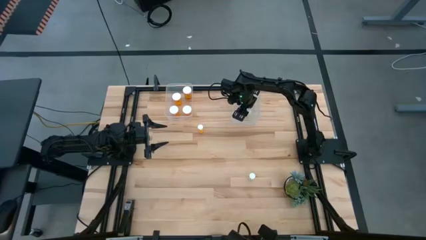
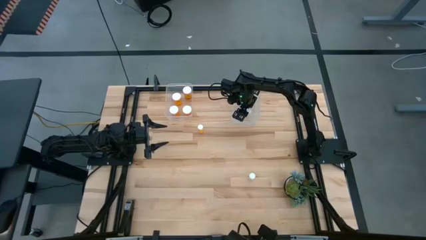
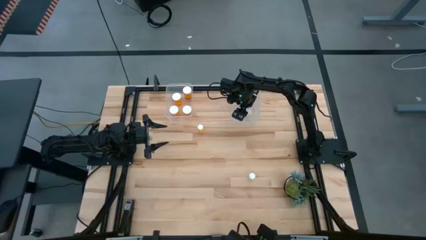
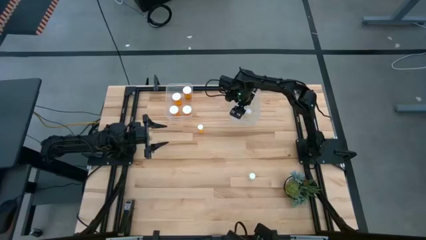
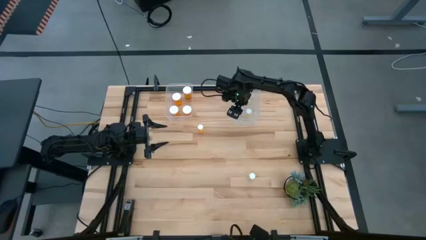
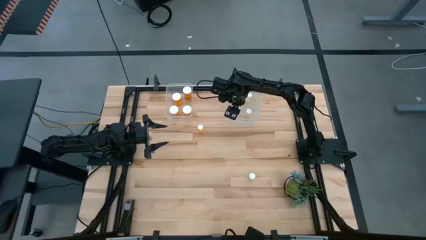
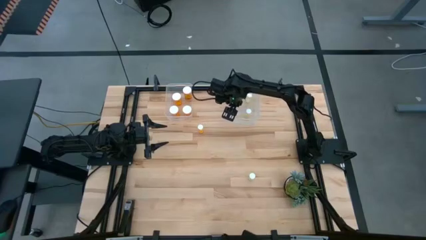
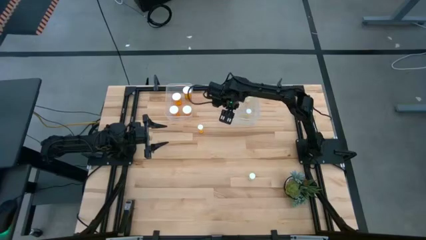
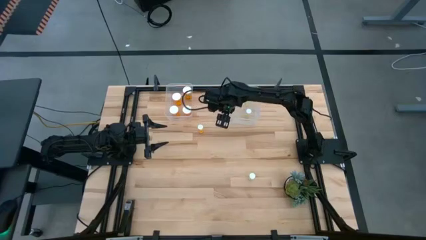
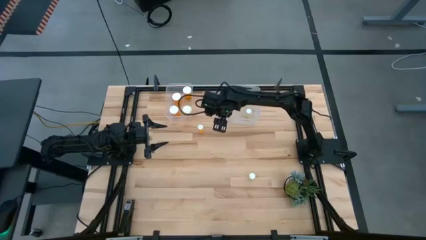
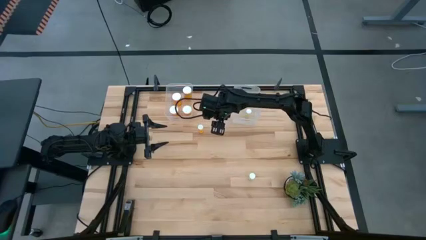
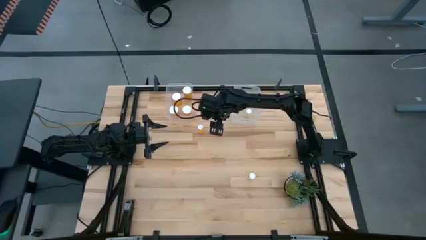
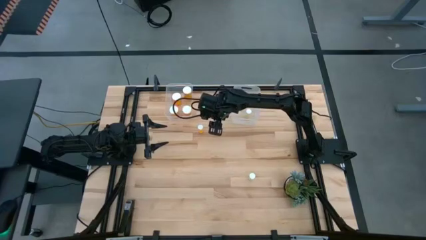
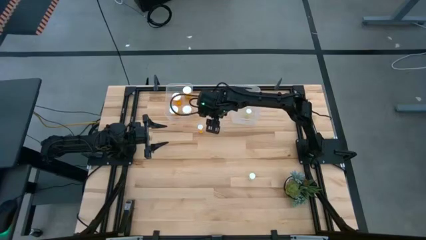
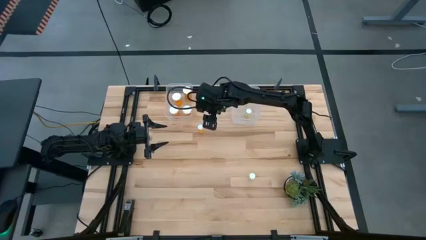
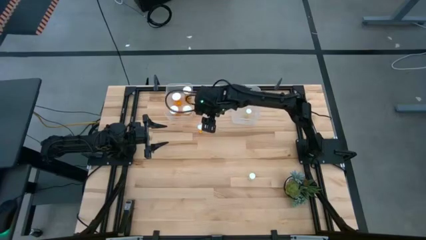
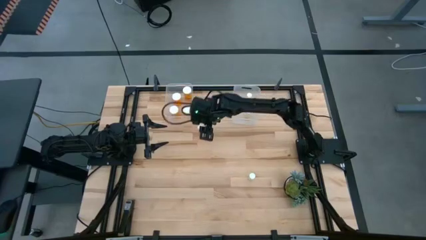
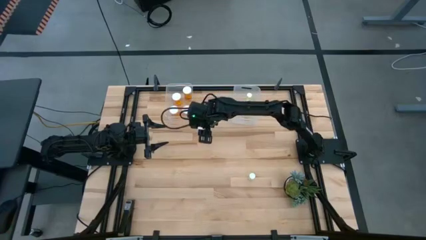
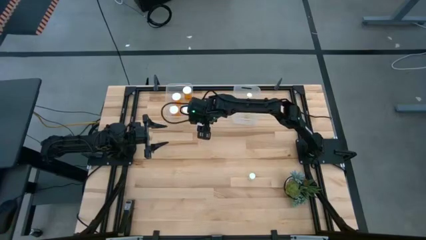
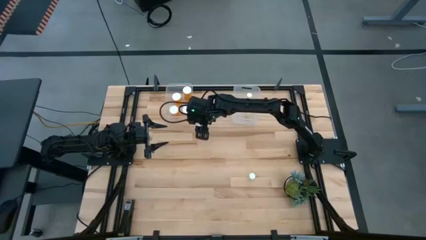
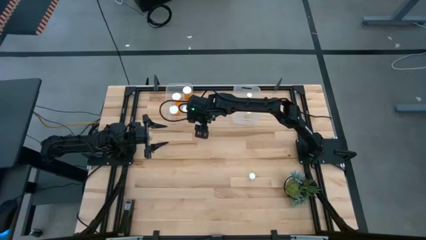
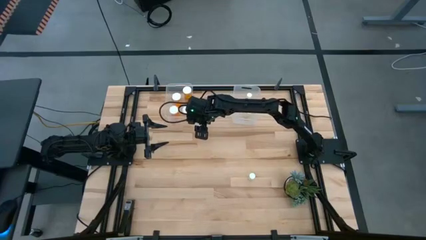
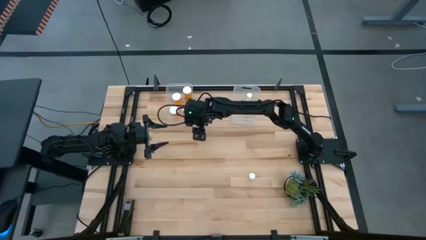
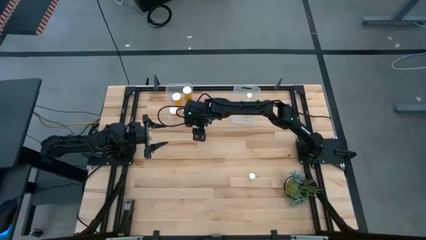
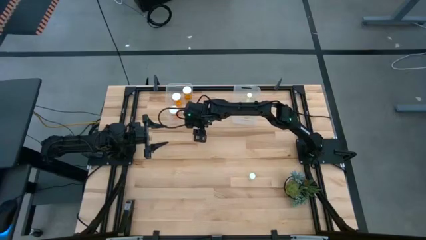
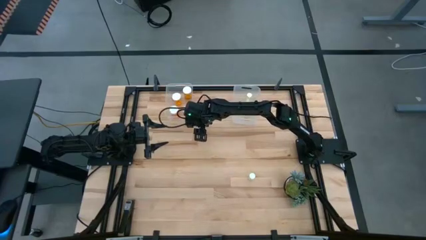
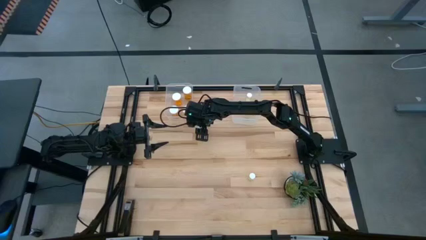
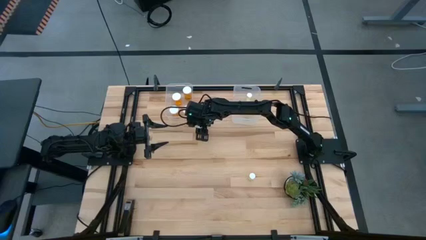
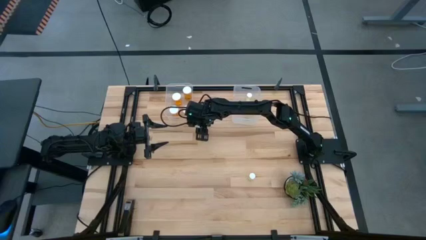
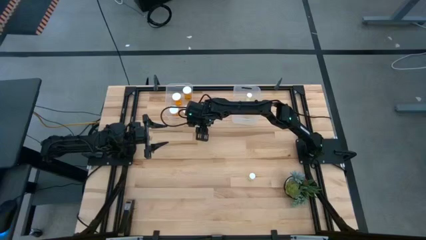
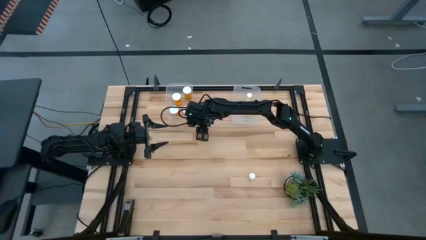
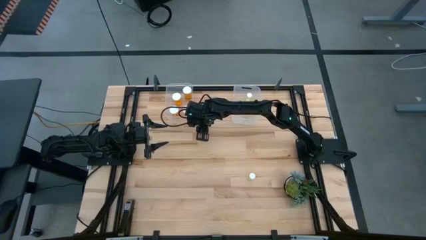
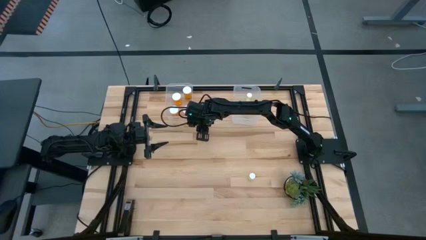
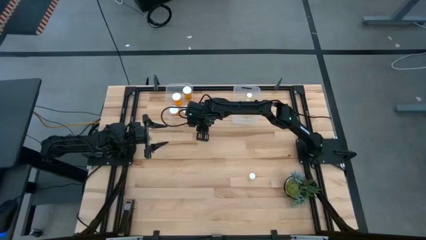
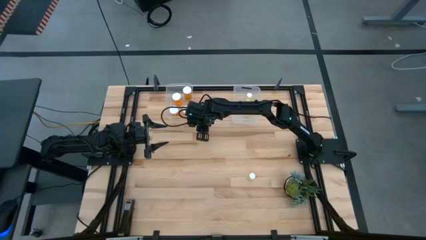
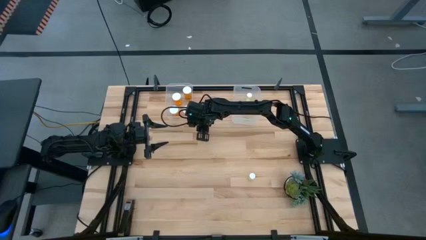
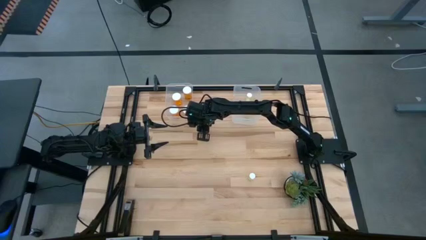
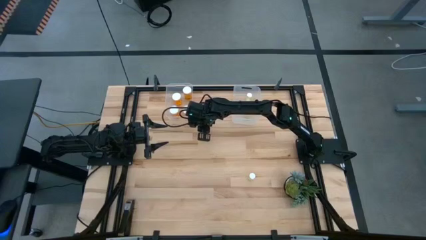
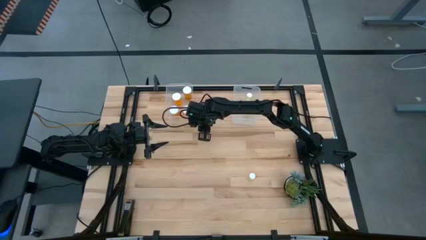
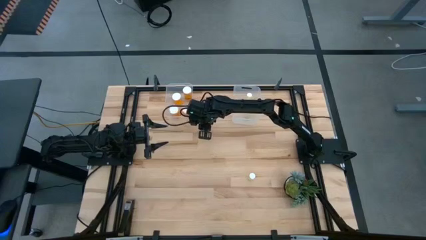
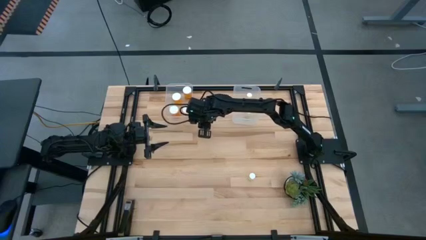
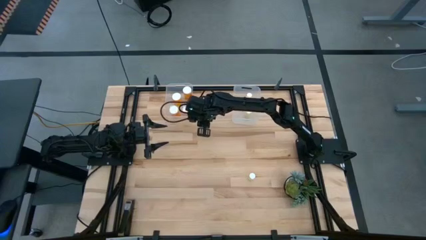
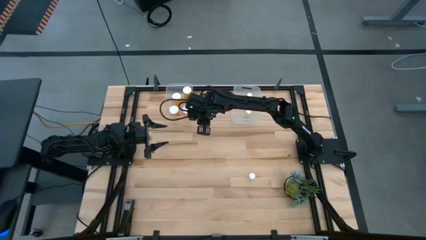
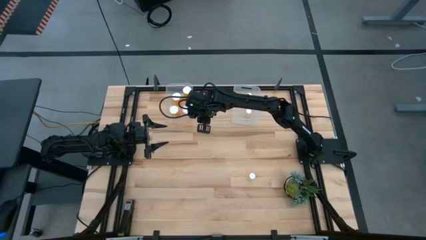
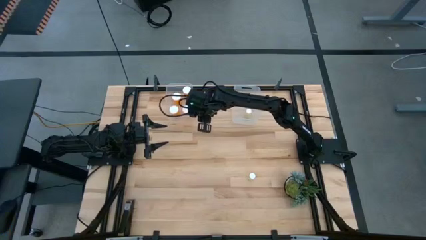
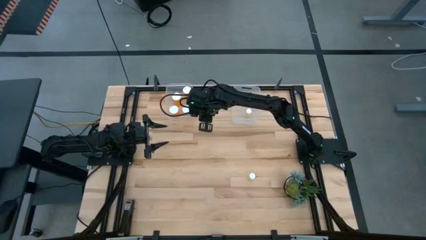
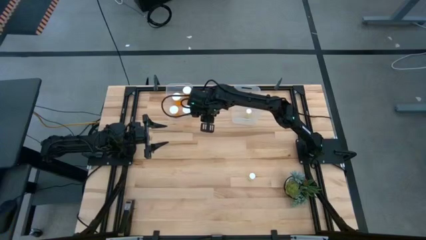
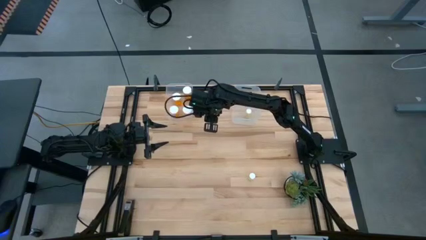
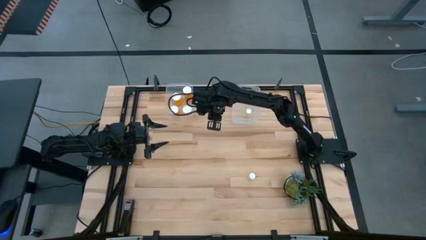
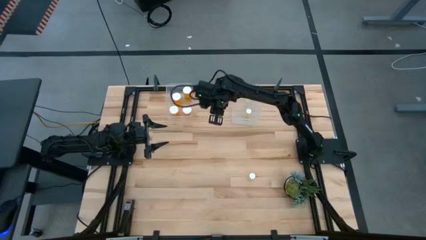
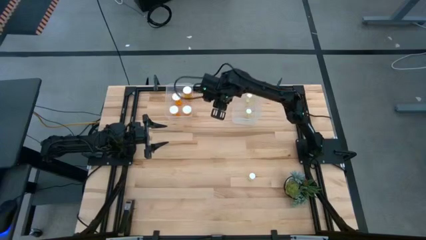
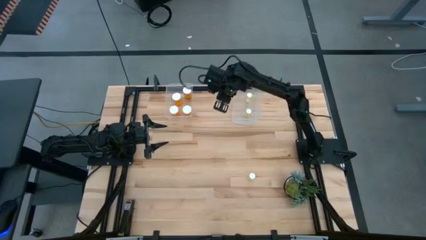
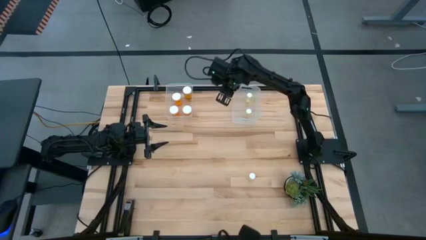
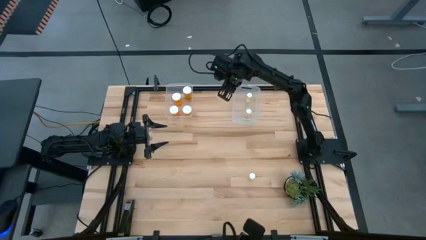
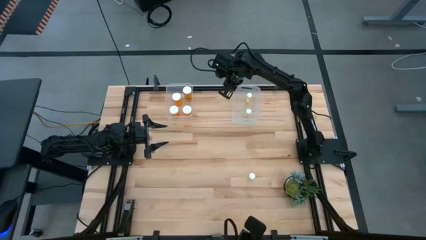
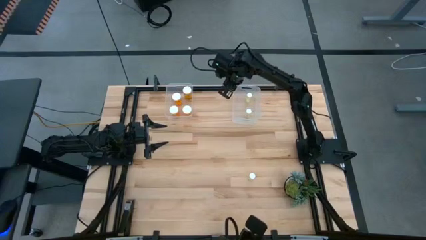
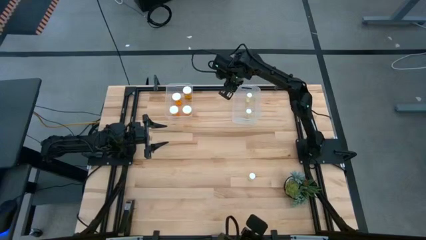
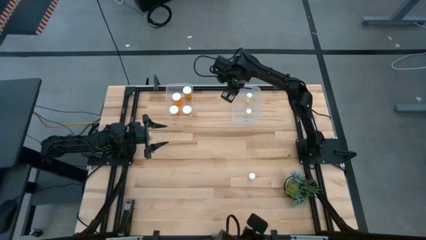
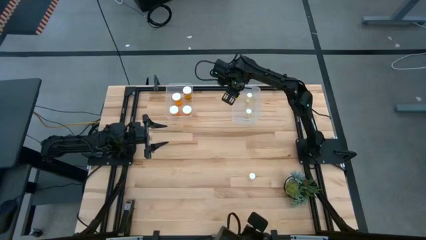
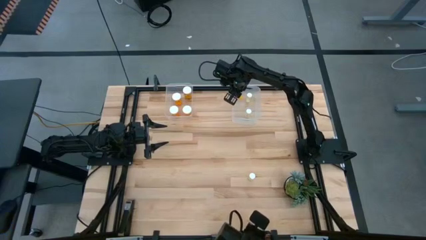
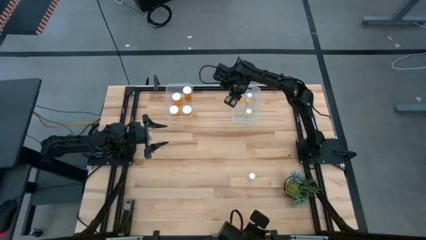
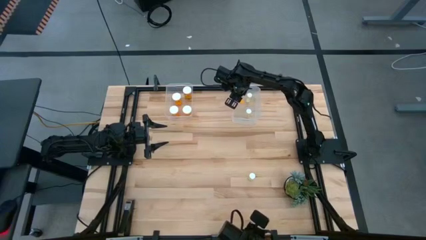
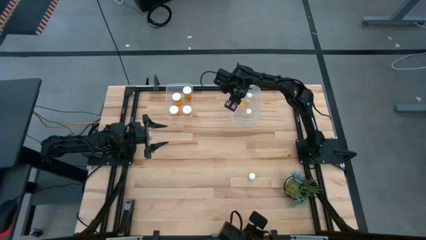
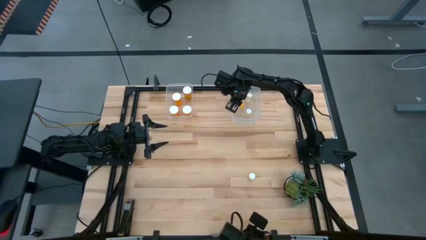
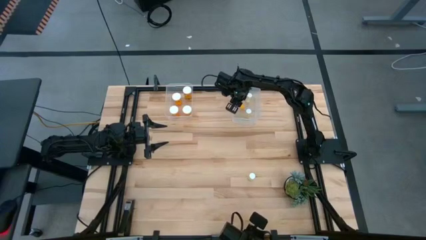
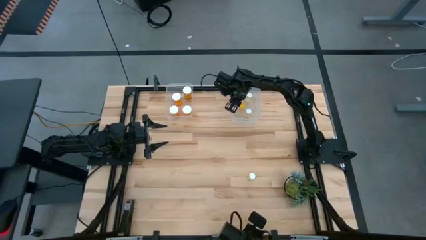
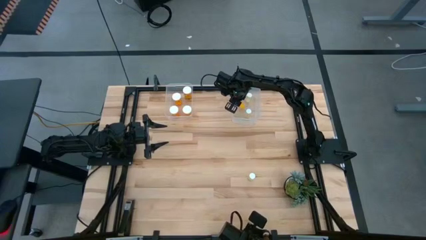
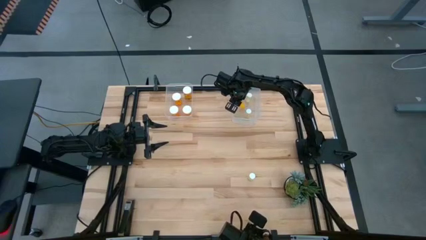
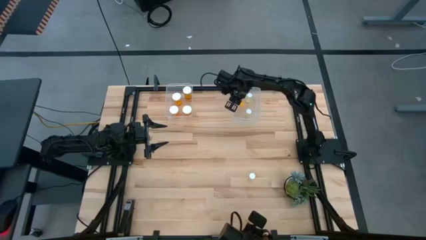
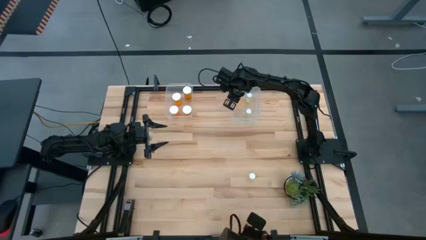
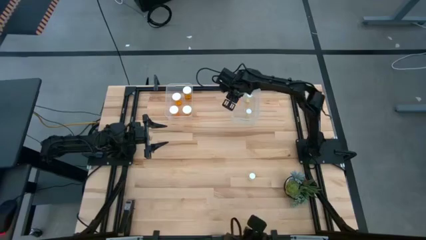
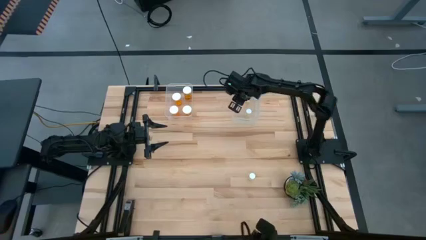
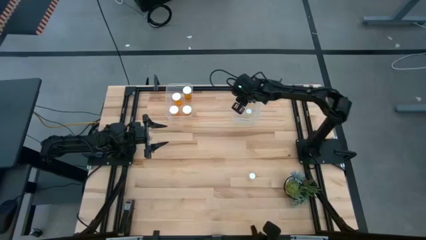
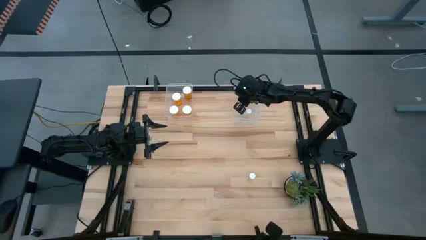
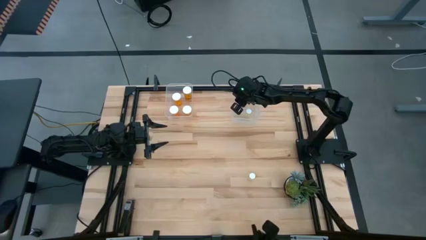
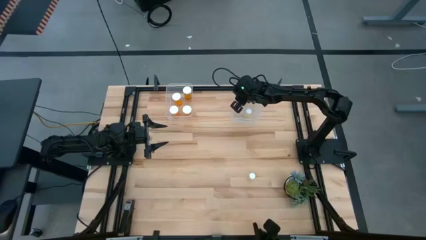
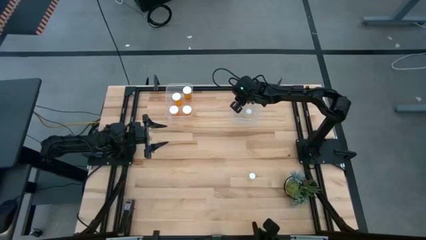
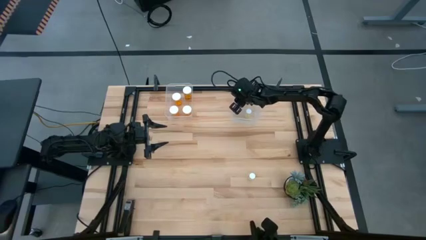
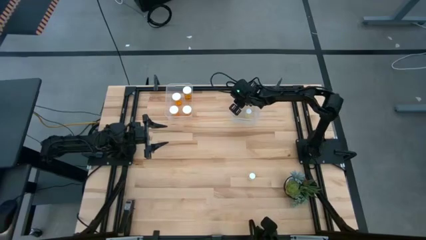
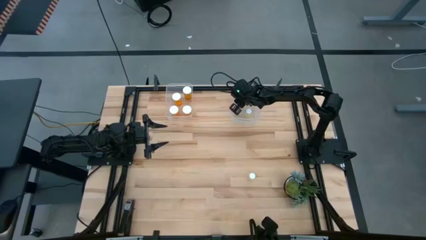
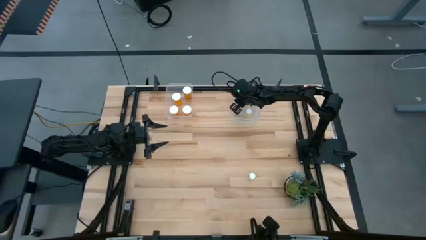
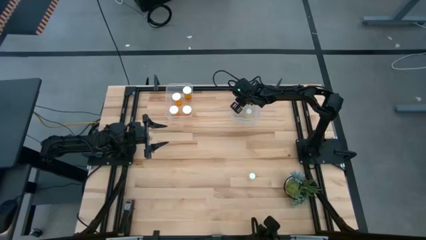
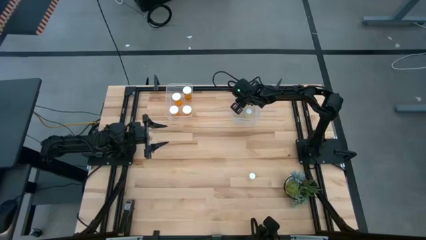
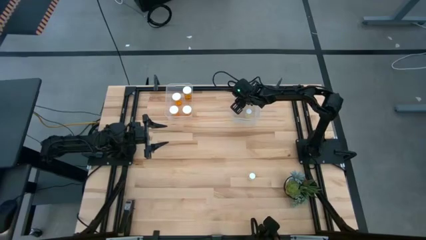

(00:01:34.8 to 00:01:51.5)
Task: Pick and place medicine bottles into bin by pill shape (circle, oval)
Put the small orange pill bottle into the right transparent bin
